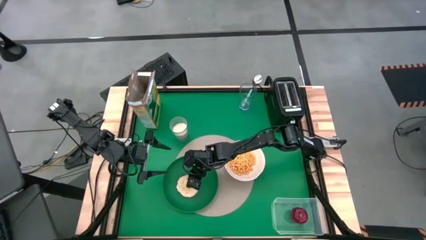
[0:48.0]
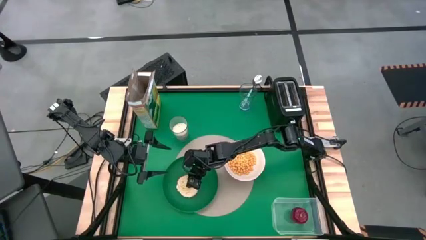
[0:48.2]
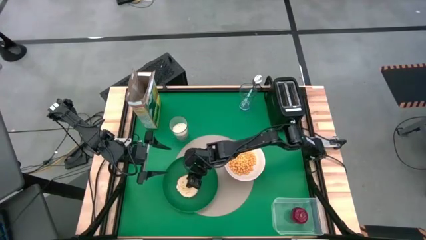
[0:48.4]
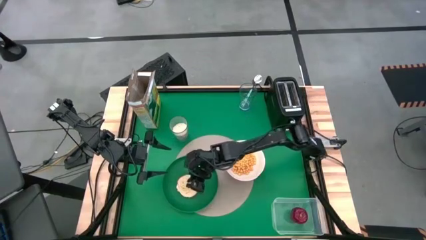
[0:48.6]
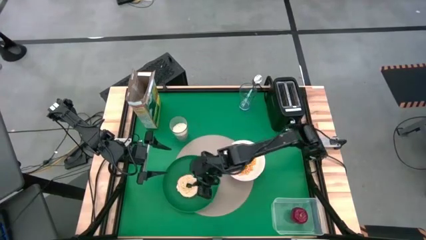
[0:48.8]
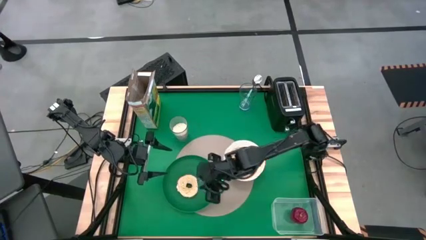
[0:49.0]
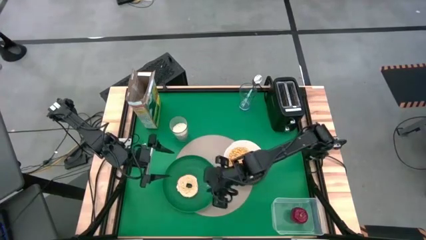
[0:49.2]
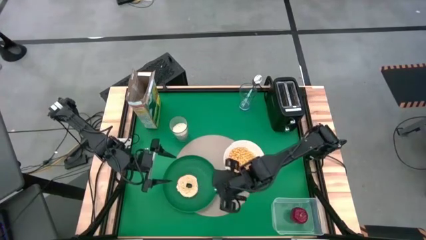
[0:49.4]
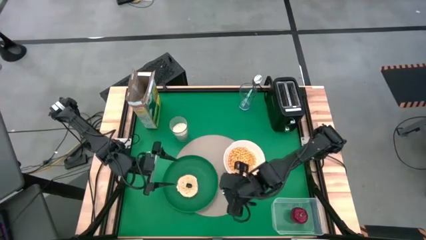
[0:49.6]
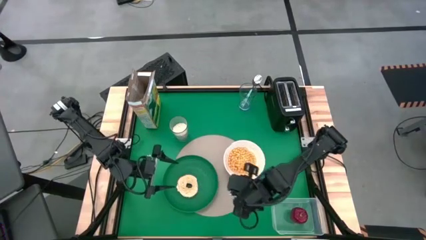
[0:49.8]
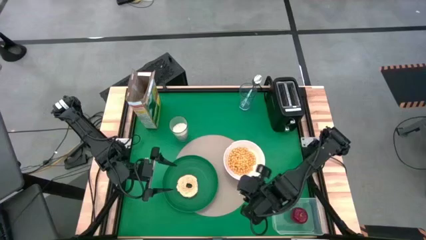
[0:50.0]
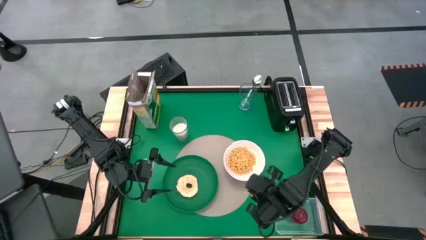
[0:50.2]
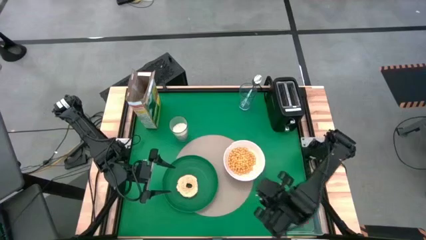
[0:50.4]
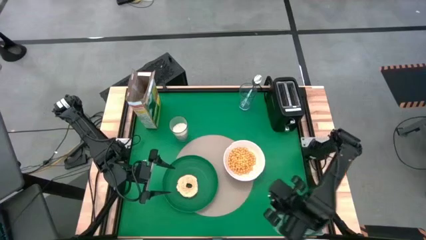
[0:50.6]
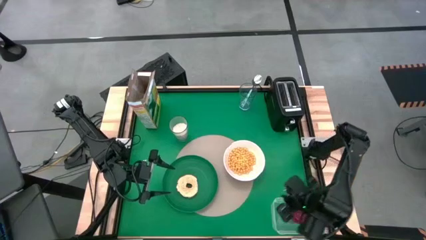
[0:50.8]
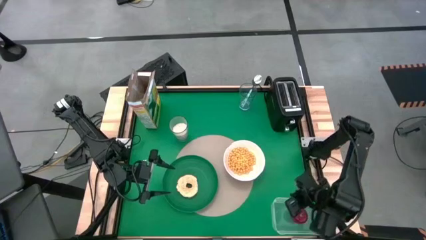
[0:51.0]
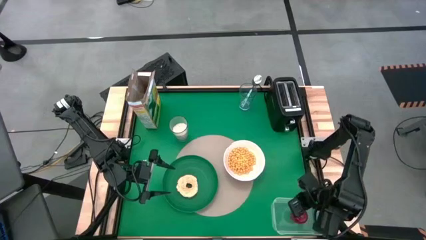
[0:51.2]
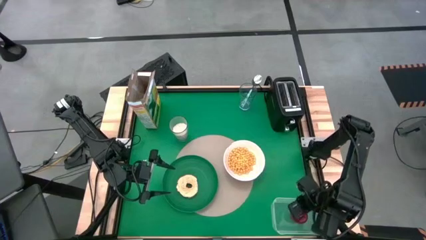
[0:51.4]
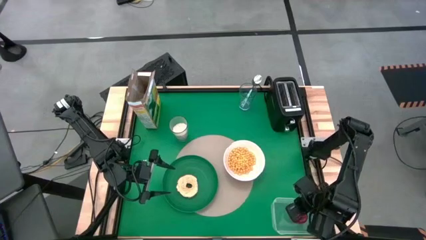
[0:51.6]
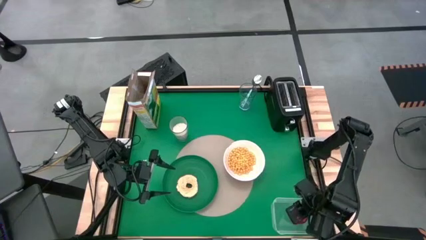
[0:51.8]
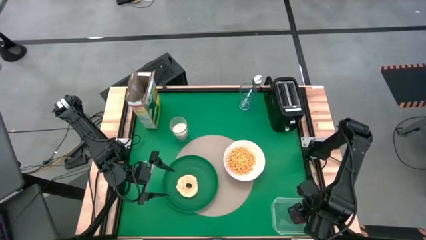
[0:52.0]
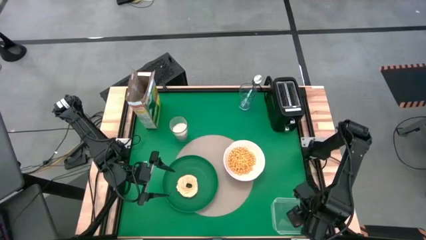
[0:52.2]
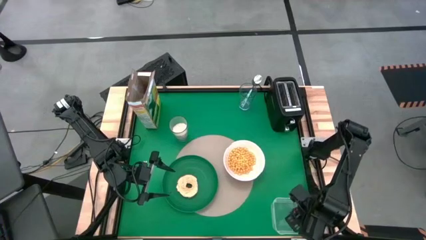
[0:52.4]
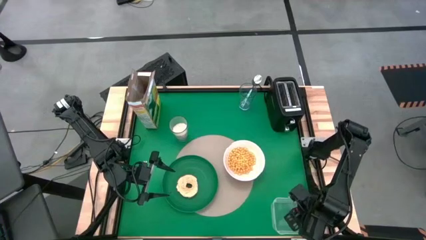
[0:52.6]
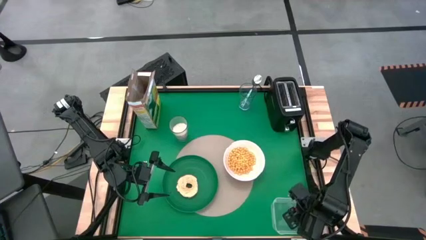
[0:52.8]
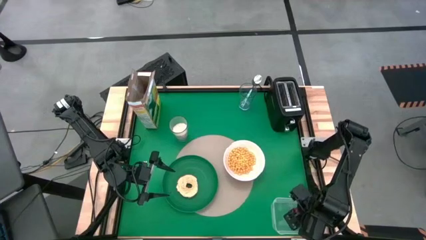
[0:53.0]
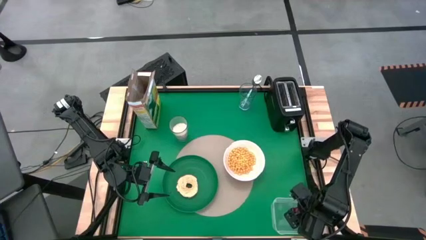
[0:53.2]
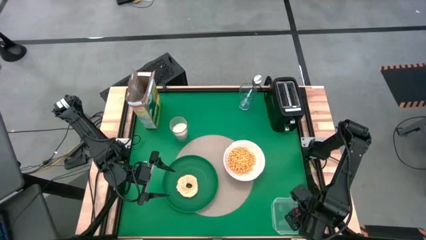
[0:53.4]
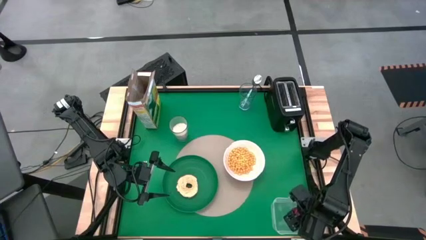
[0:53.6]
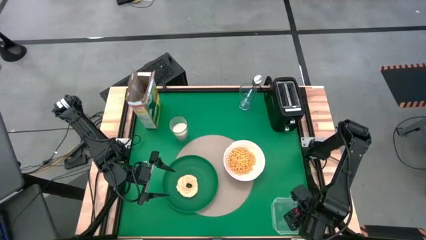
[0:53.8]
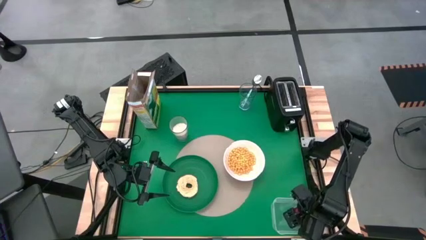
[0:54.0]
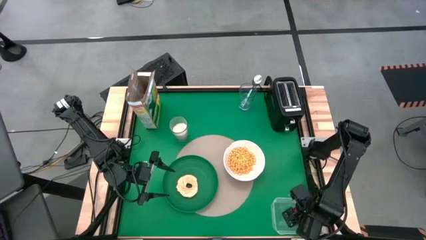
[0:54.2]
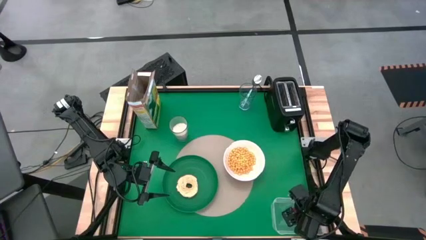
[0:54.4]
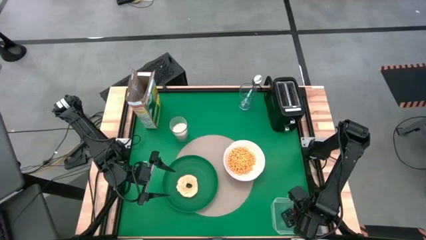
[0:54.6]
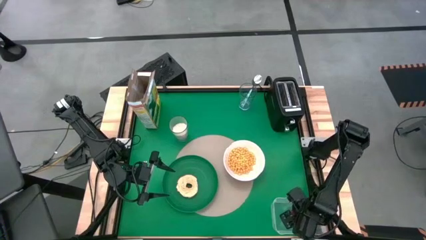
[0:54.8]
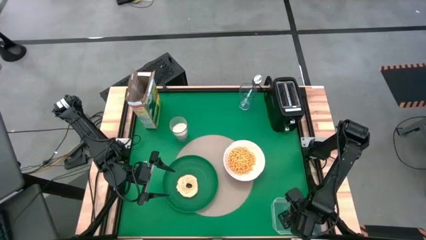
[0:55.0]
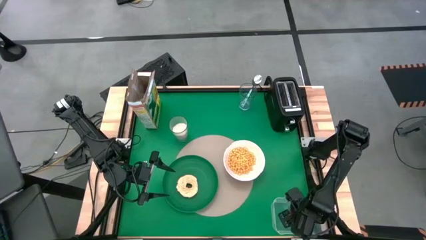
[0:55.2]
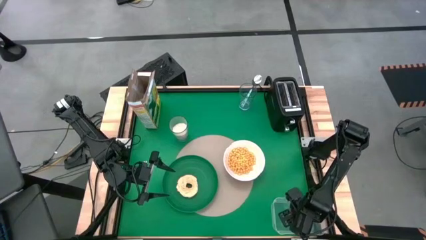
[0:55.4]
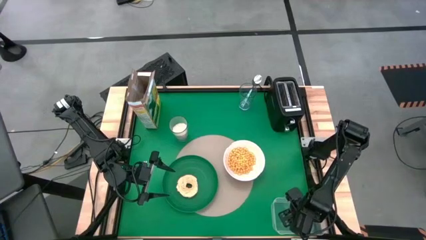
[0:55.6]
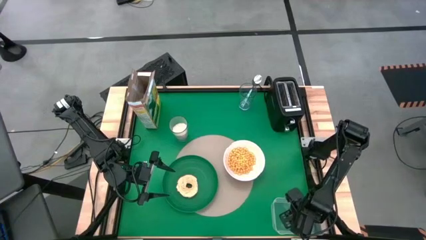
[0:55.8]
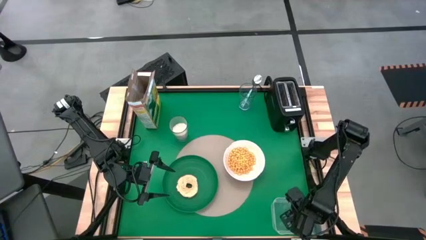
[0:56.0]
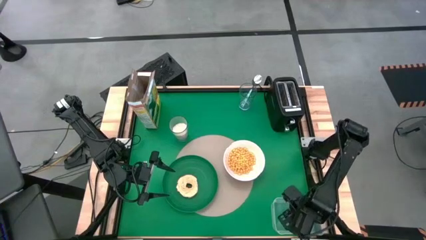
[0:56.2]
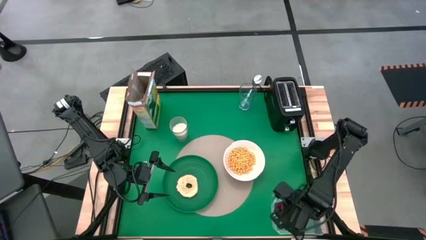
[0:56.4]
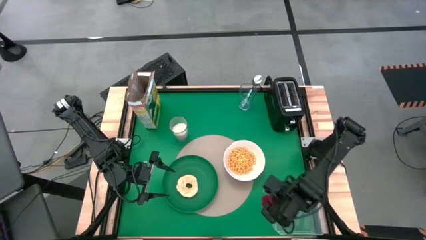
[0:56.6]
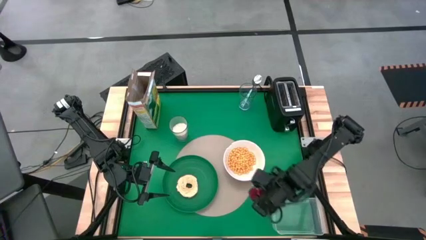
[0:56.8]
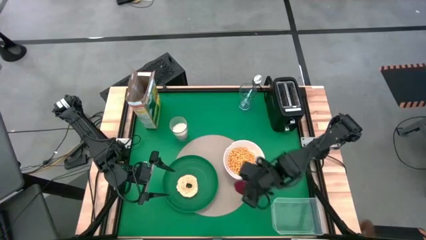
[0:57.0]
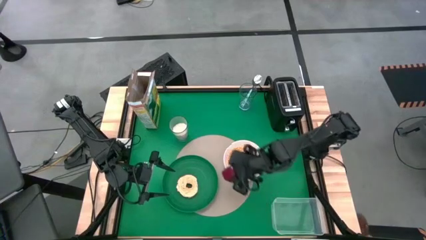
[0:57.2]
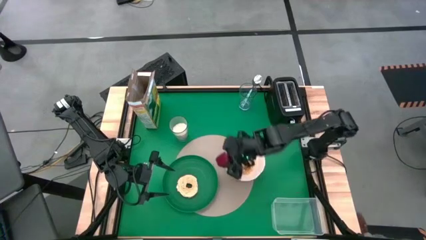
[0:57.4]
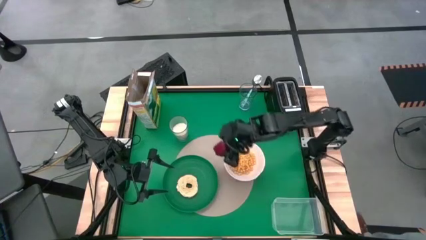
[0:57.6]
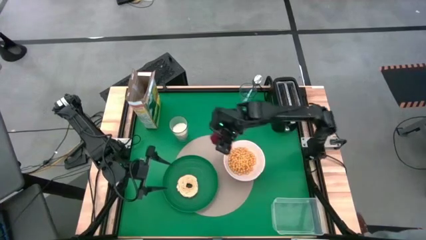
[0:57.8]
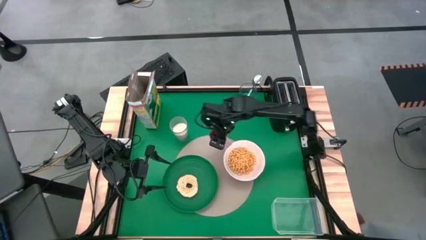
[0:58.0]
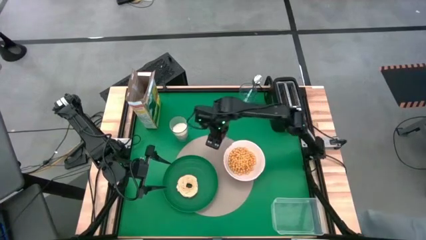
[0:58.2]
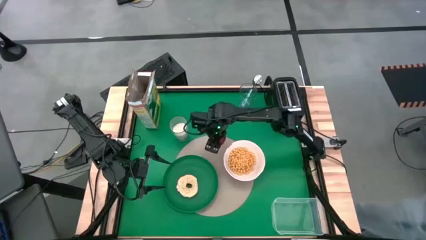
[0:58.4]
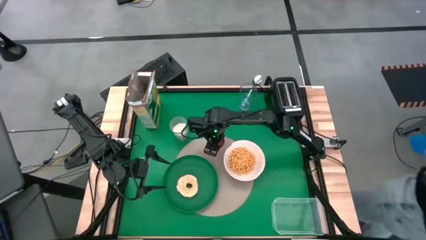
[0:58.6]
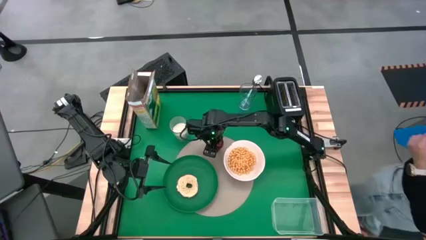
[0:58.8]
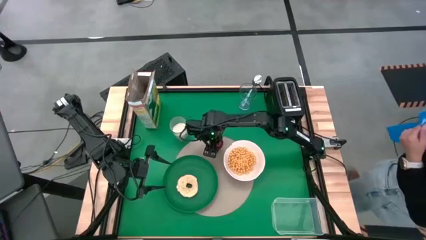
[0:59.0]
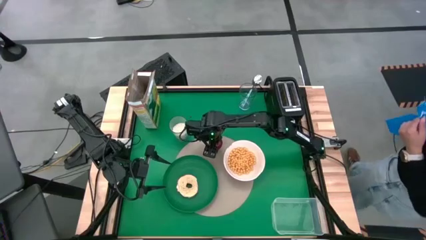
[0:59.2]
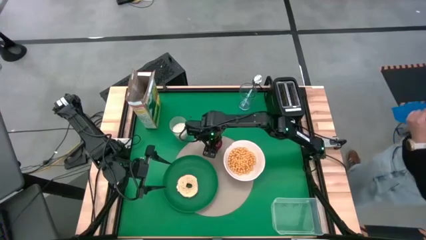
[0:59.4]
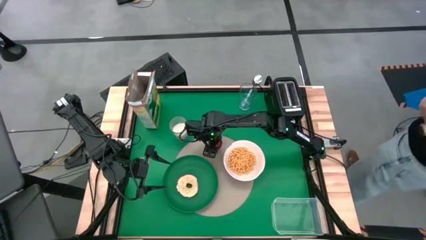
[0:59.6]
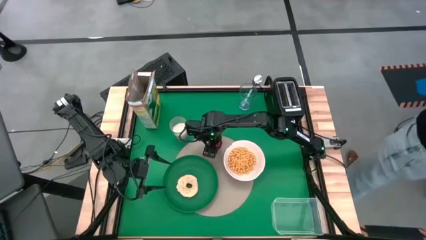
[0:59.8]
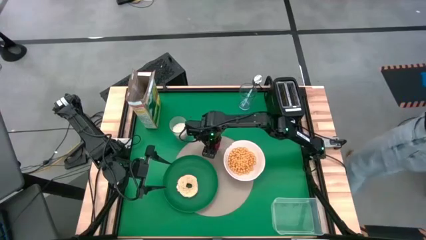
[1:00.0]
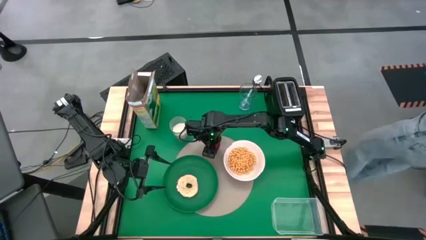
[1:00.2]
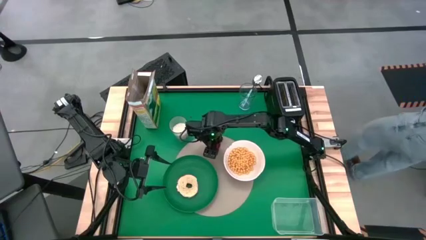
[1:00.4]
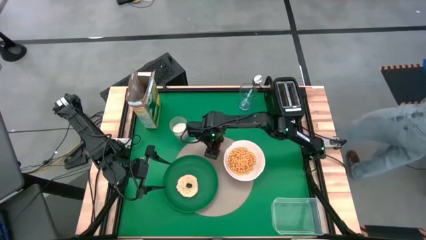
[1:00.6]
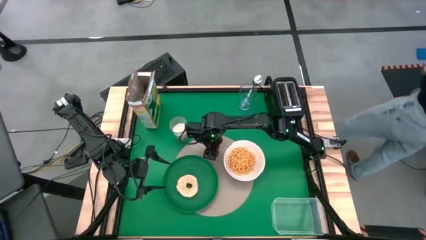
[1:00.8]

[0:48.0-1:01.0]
Task: Arrange a breakfast setting
Put the apple on the placemat

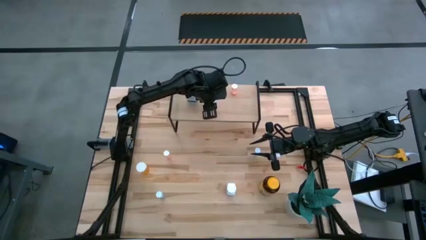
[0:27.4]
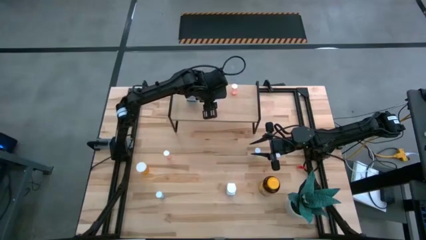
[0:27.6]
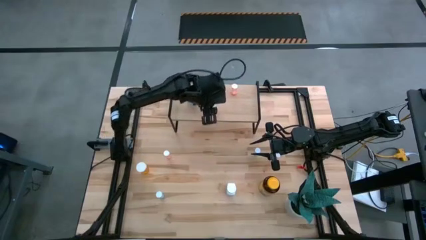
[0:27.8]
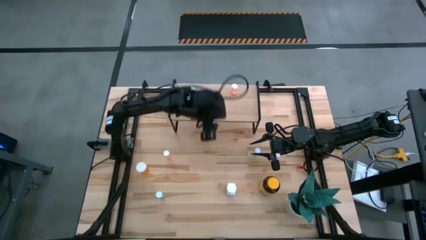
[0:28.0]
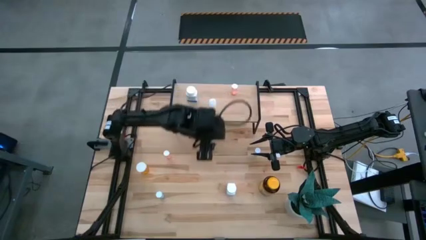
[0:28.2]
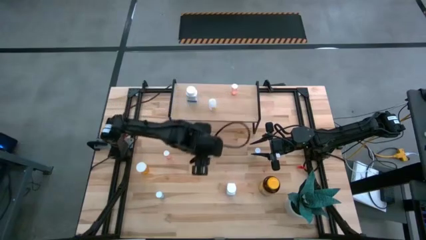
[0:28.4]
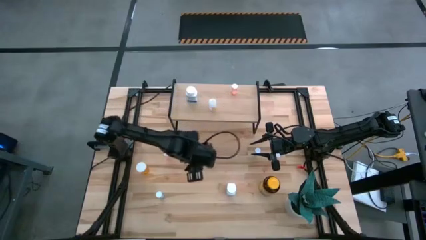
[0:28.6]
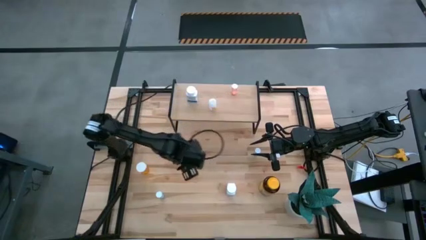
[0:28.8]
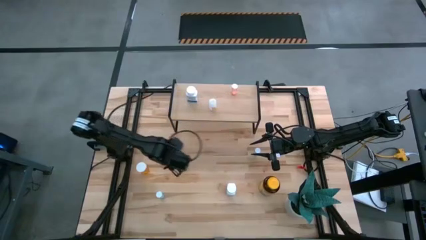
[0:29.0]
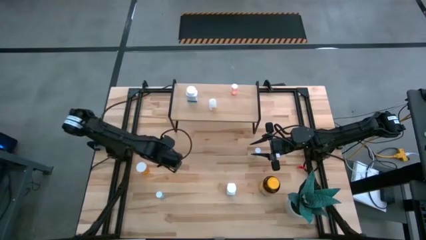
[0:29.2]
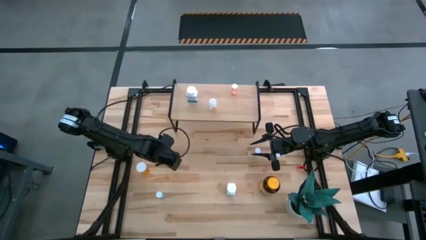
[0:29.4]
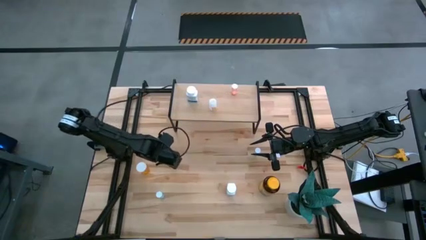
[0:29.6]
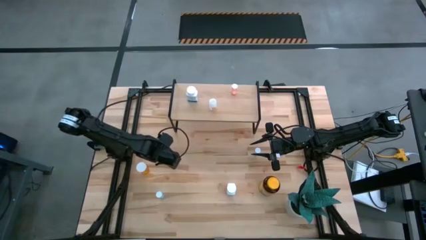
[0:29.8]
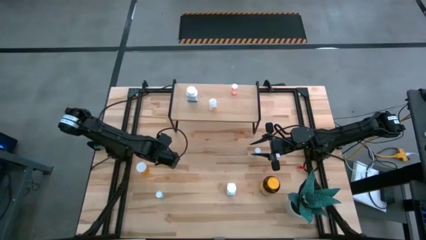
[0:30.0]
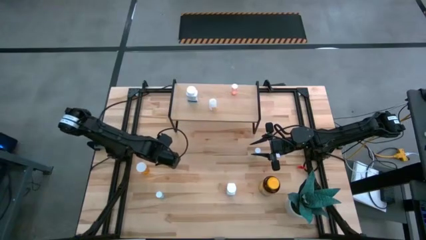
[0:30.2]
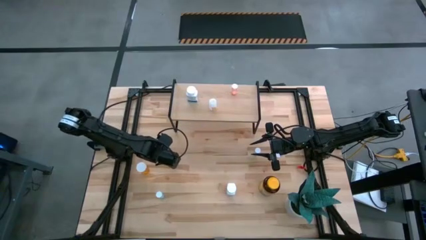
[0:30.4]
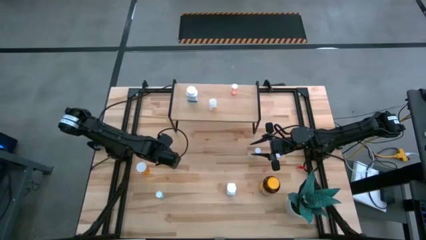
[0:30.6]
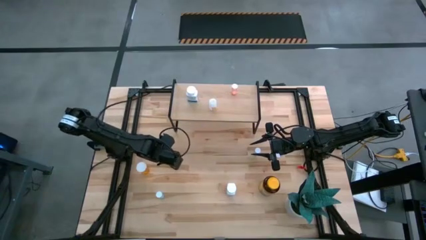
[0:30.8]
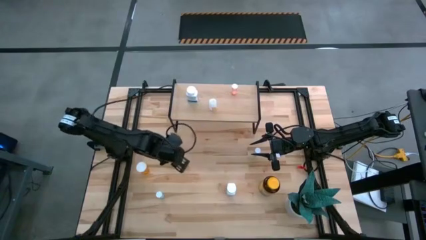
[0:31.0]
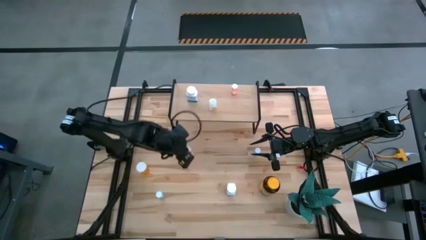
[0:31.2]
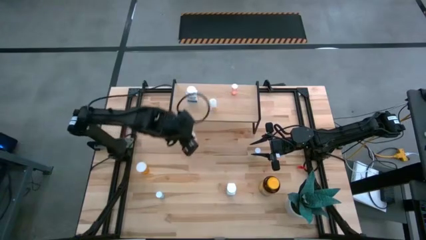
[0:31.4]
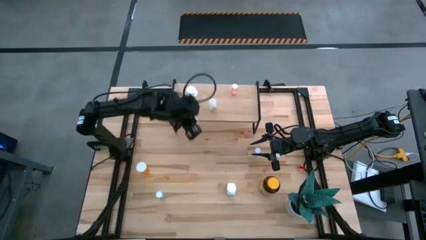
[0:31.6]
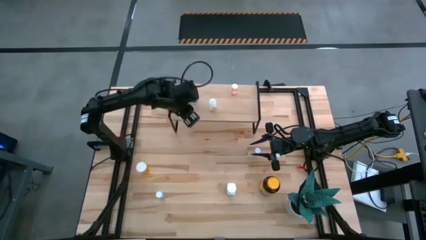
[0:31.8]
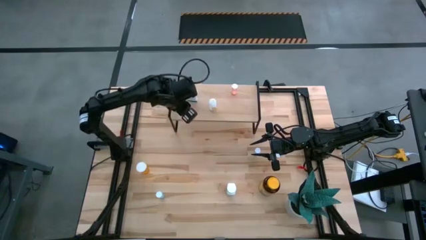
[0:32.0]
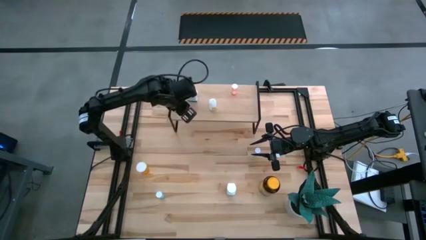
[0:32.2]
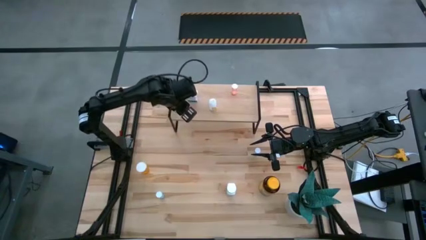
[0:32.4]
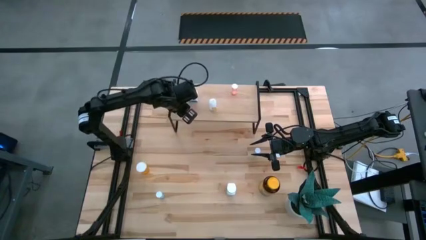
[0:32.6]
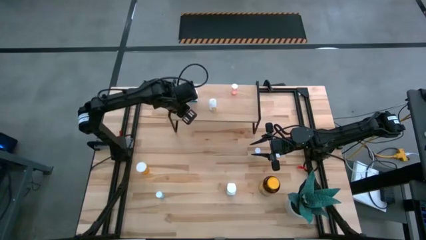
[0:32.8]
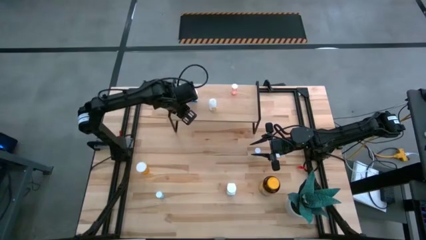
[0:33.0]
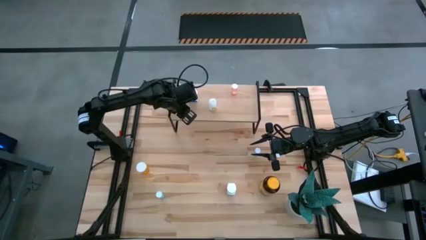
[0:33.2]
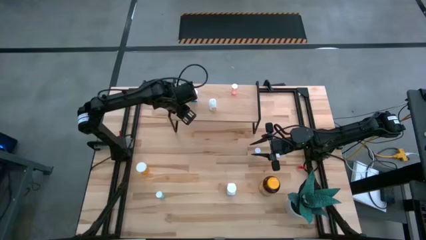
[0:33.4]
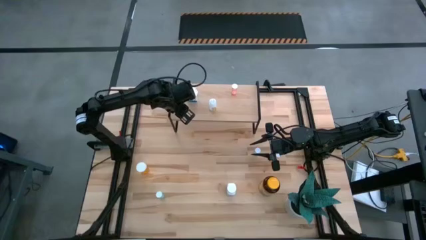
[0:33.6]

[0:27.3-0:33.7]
Task: Pick and place medicine bottles onto shelf by color
Put the left red pill bottle on the shelf
